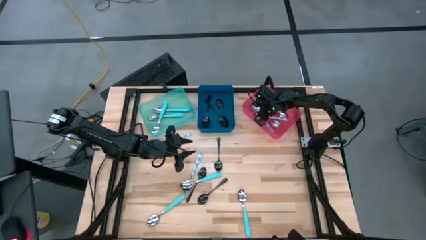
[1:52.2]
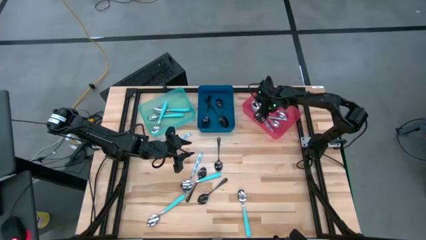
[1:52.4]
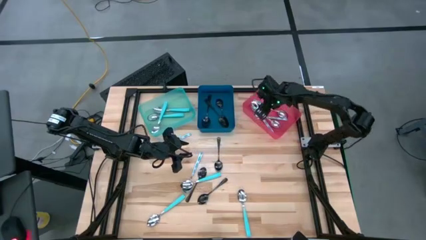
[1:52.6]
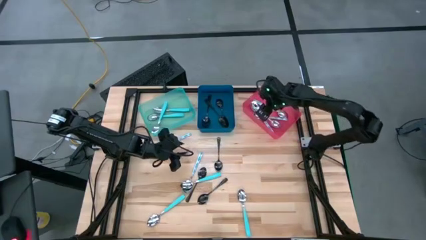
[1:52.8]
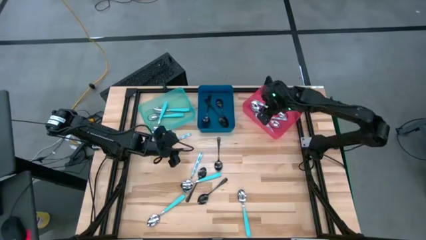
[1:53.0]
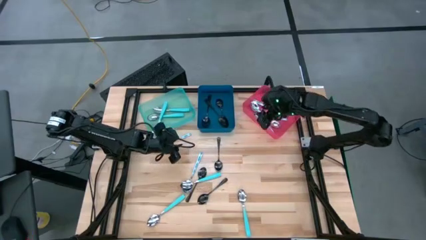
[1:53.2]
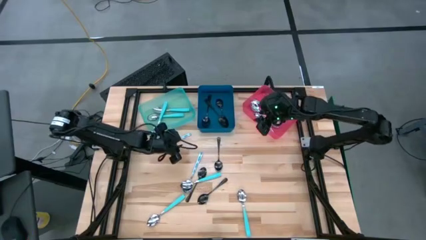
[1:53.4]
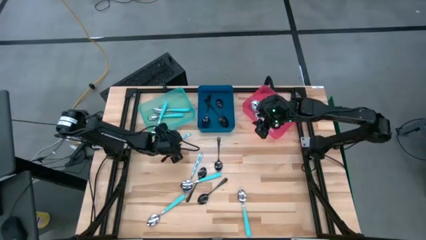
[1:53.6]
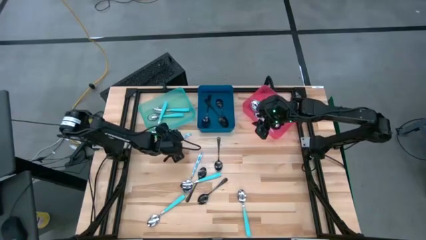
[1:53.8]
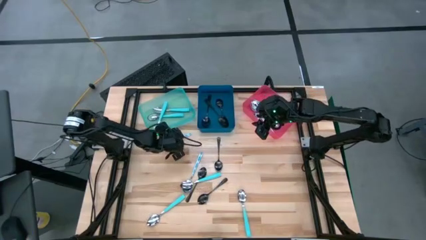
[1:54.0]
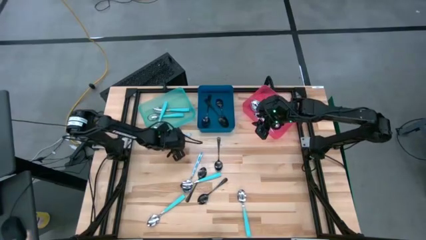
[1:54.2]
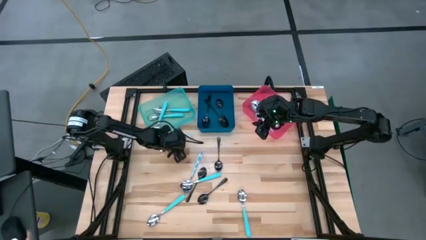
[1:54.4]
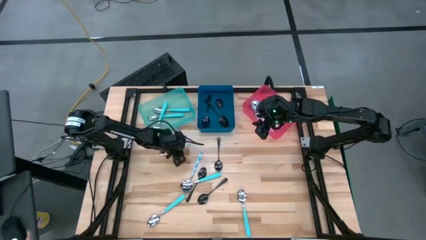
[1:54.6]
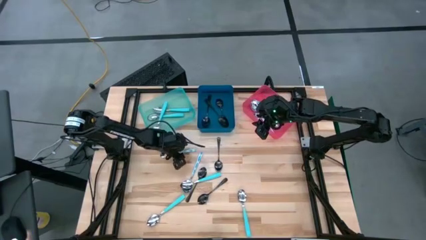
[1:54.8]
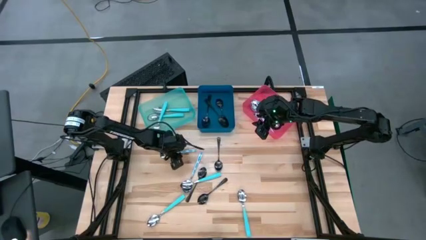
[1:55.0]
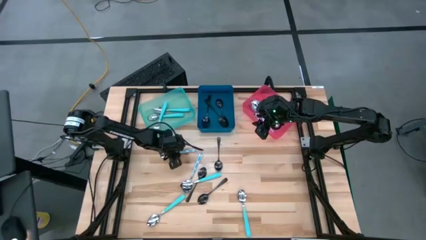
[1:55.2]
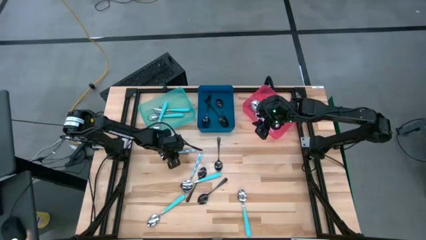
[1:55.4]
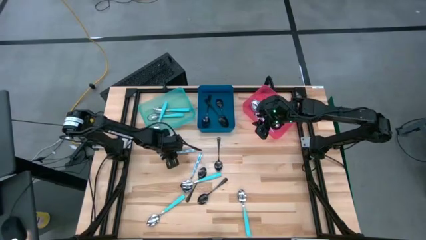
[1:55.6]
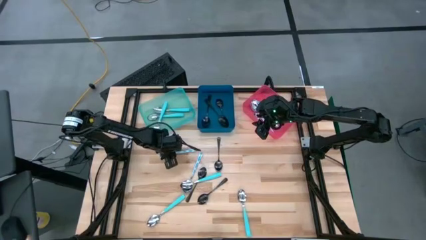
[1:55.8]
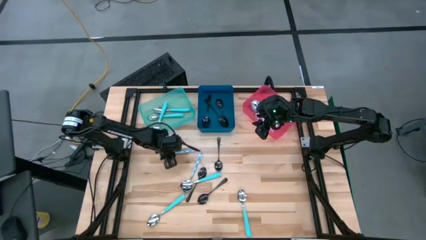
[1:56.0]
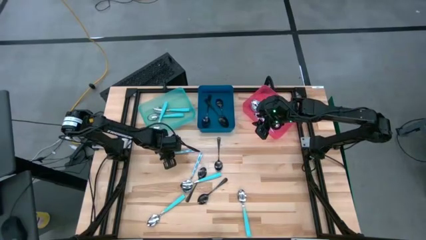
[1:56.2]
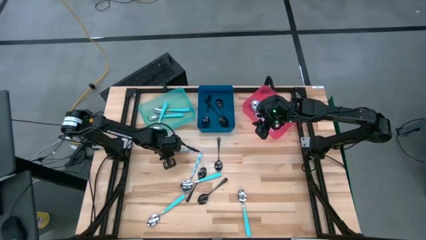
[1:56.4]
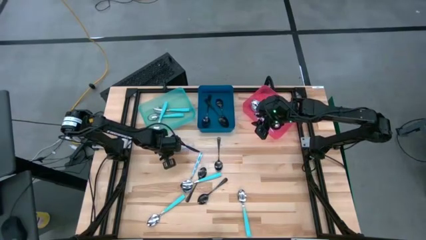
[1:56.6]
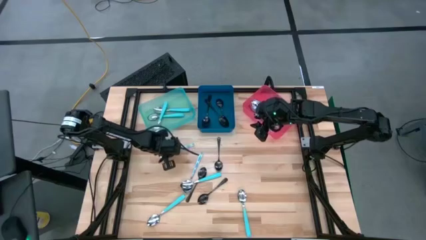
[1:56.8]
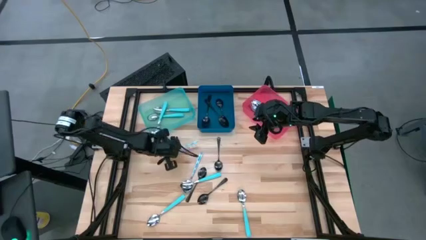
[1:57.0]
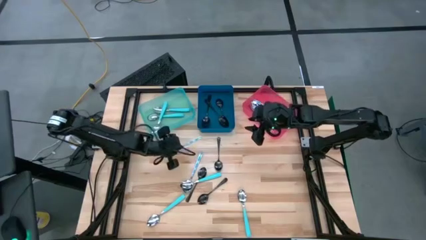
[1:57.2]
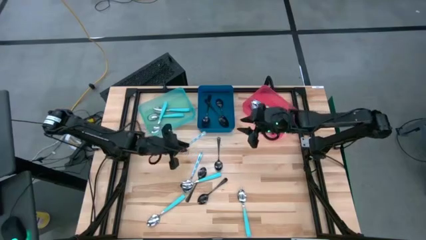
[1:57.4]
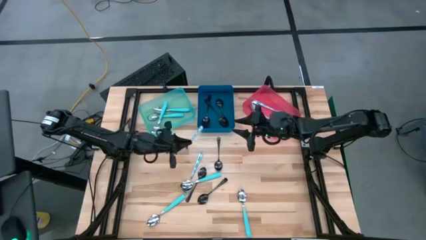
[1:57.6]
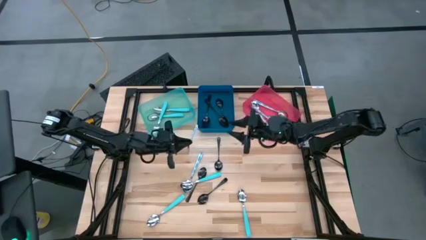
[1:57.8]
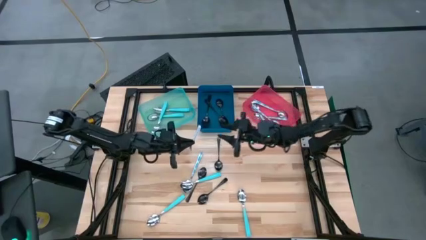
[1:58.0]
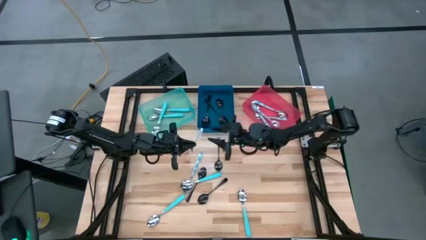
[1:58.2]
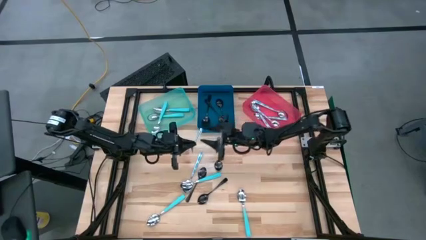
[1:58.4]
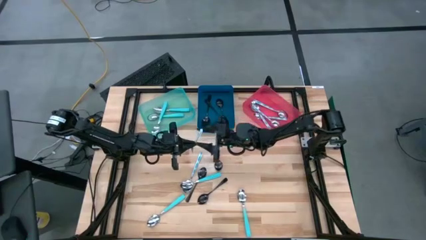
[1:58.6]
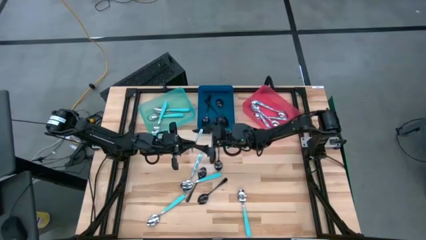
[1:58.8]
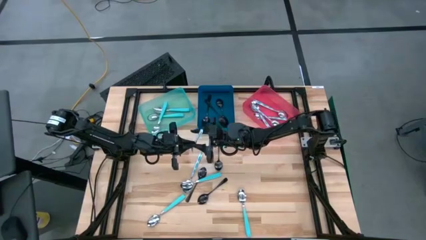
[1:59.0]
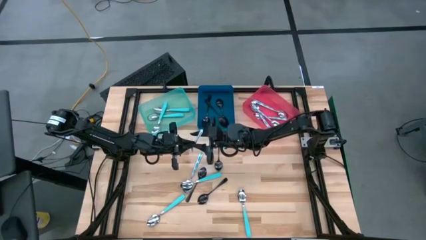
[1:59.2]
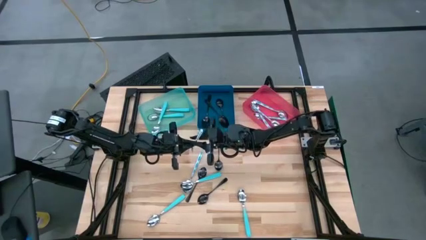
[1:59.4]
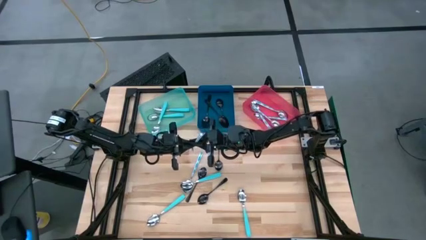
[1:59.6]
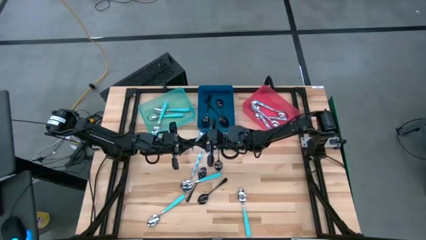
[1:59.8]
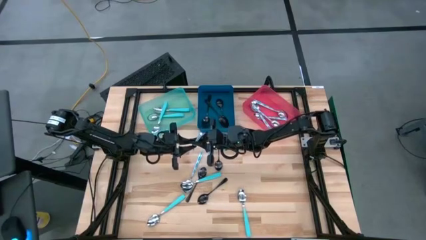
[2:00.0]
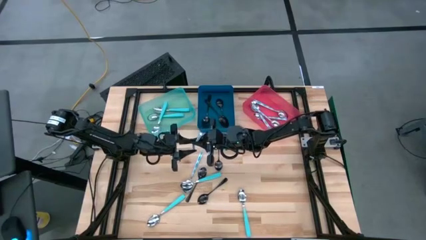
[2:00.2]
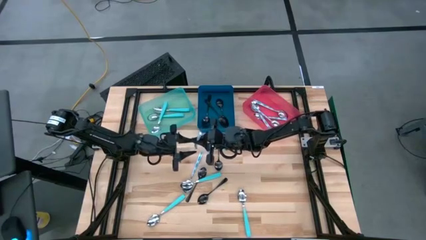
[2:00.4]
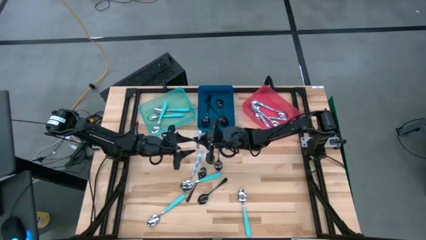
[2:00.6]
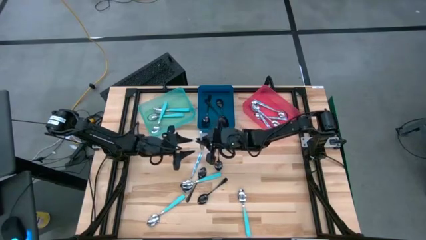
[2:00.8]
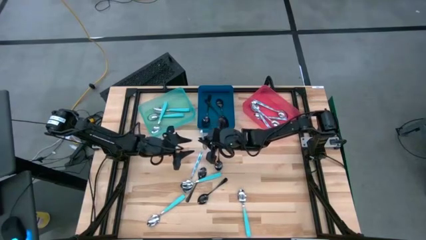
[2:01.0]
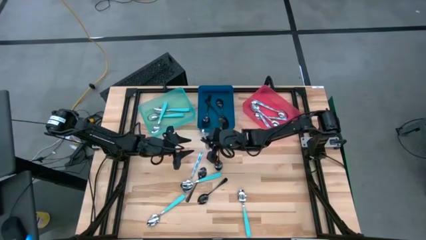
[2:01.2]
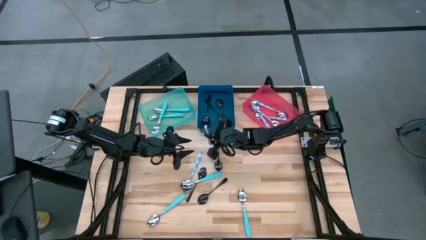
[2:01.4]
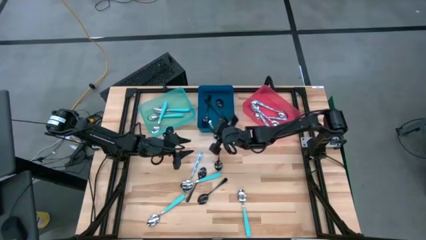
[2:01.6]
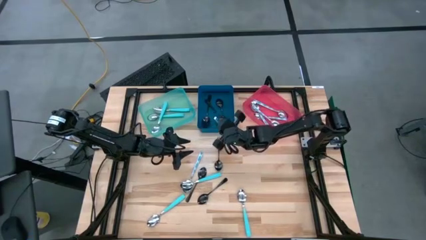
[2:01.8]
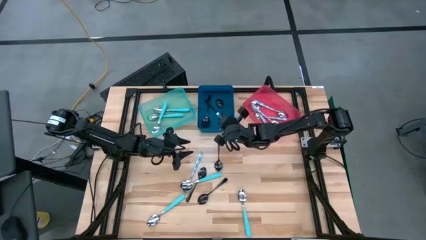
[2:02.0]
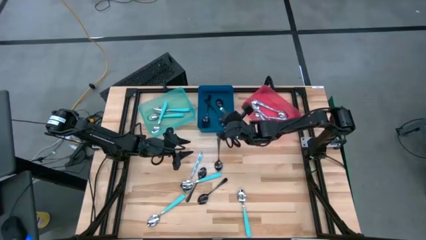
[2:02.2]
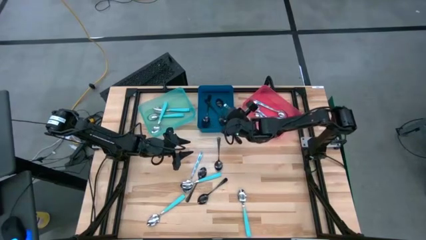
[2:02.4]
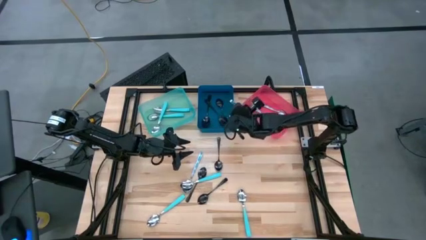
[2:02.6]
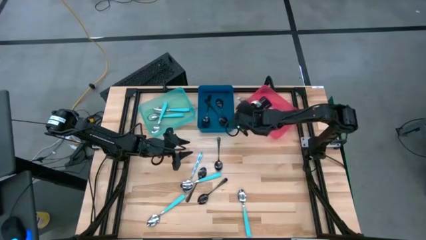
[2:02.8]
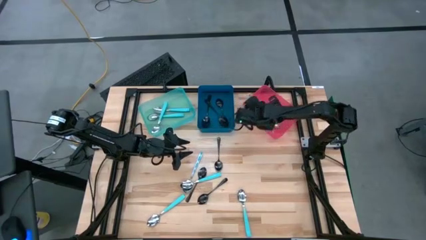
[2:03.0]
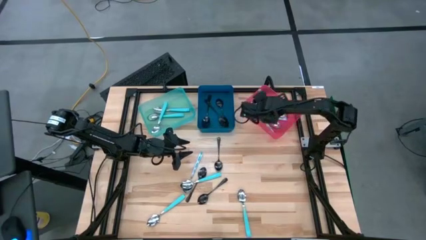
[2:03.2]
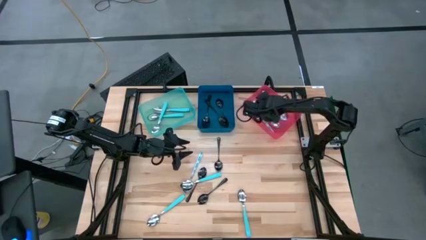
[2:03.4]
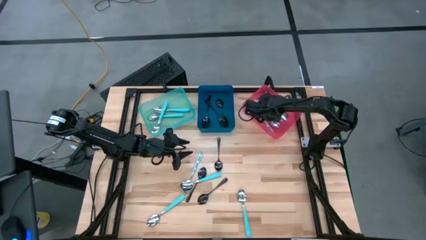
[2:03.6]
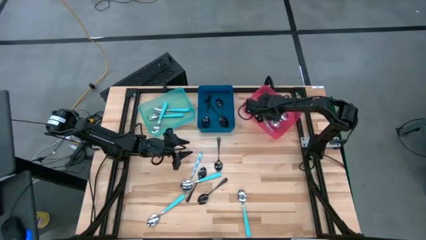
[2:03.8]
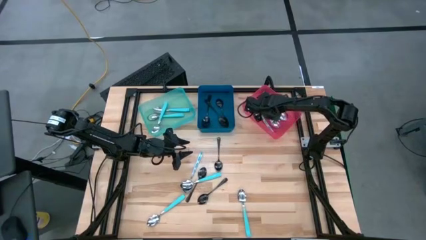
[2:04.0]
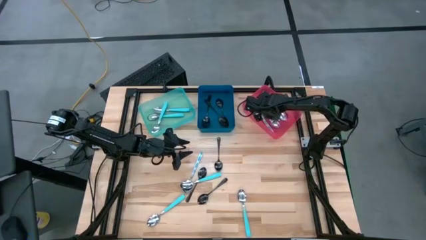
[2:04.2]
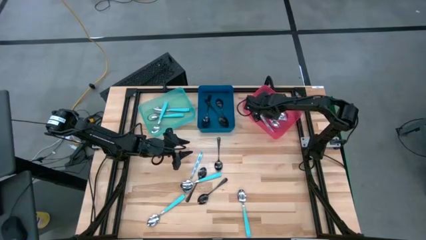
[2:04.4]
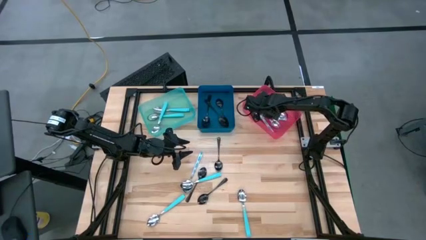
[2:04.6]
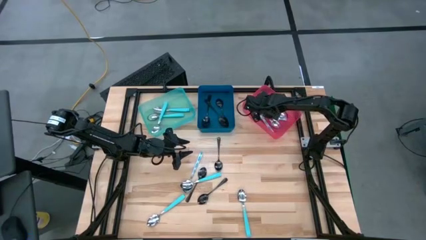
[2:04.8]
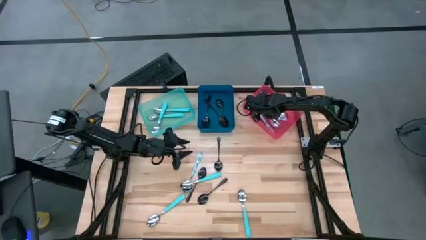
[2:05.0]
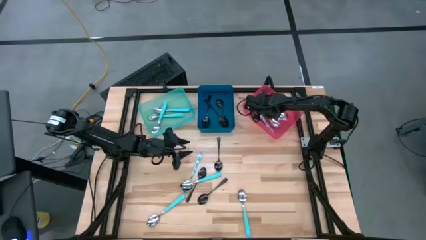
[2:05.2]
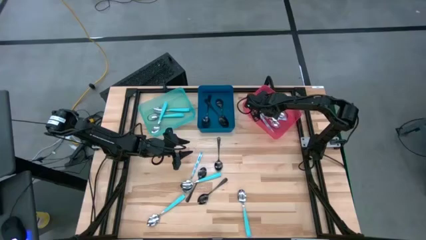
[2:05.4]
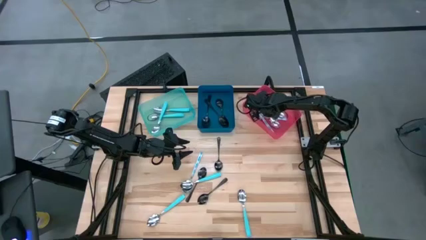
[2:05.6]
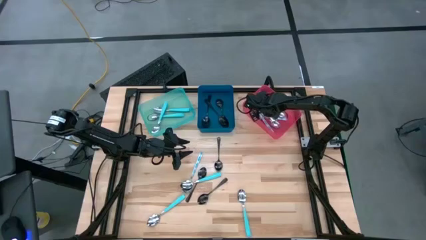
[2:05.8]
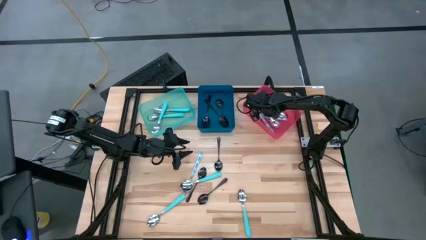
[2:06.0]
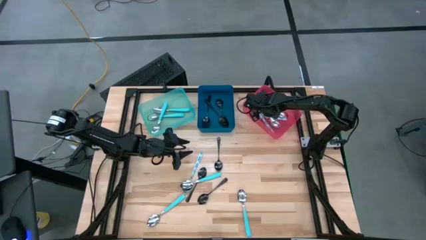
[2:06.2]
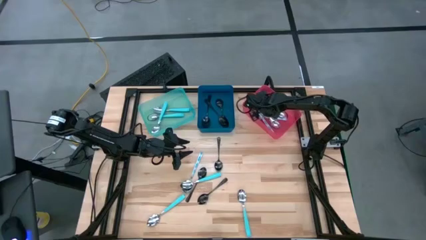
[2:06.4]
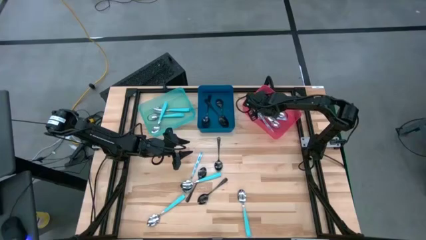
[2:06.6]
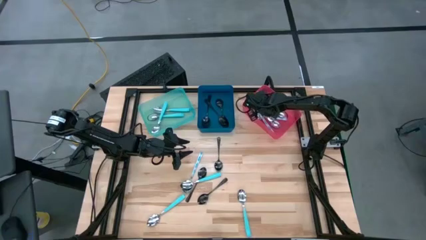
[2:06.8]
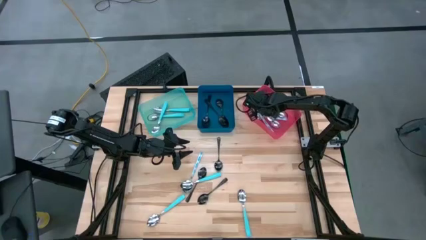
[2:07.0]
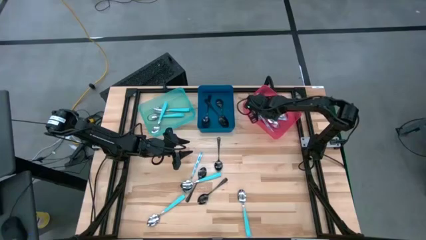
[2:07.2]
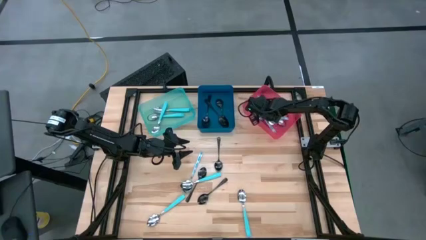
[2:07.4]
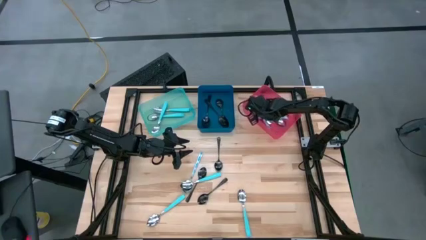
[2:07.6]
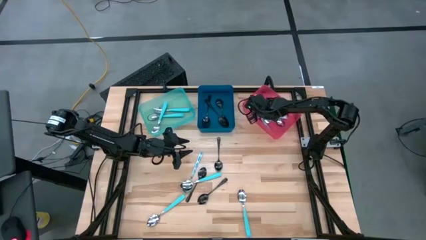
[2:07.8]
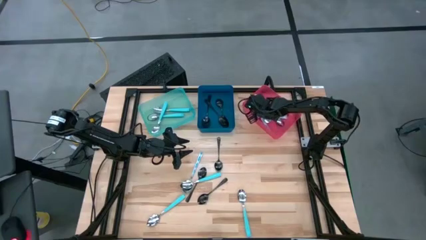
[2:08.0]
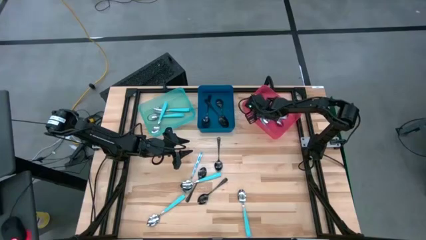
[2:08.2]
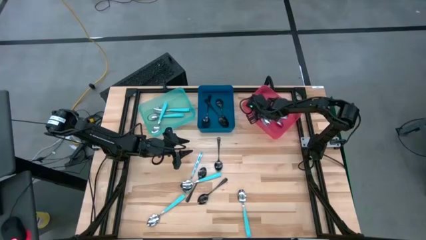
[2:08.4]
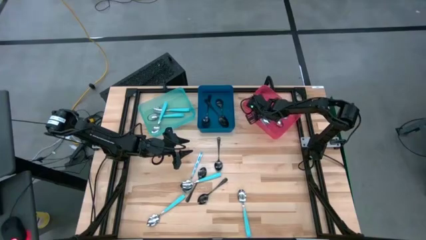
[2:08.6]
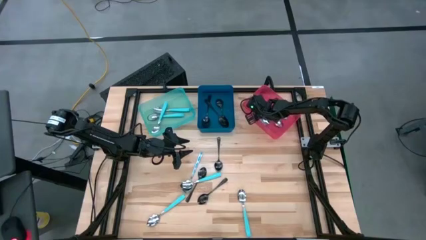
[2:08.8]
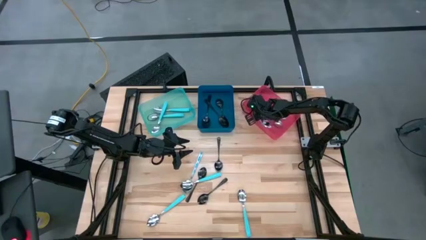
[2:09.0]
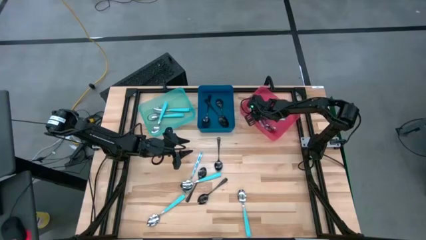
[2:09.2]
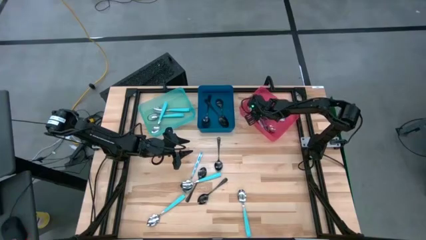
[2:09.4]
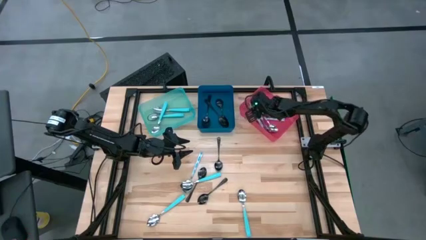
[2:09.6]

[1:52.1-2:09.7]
Task: Sort silverware by color (type)
Put the white patterned spoon into the pink bin
